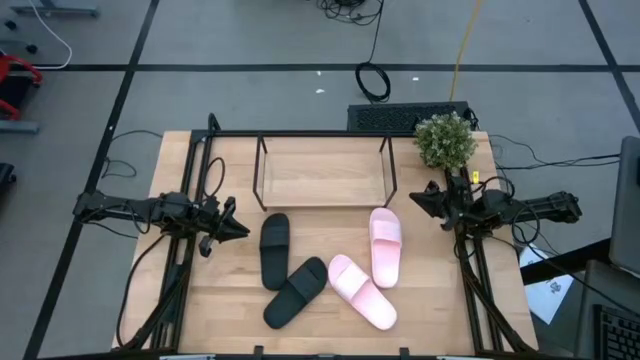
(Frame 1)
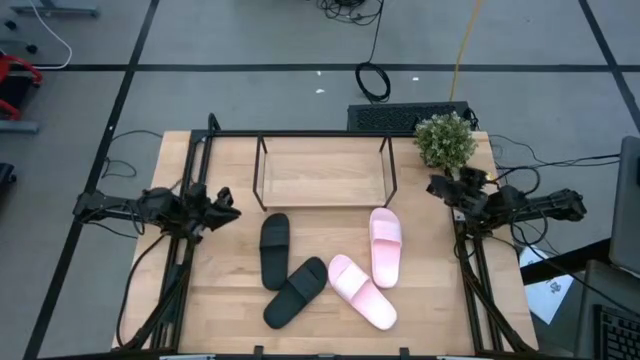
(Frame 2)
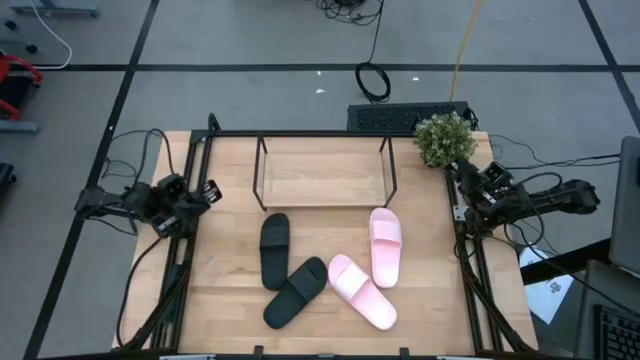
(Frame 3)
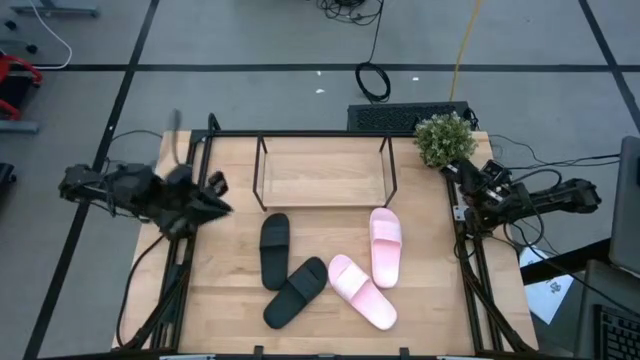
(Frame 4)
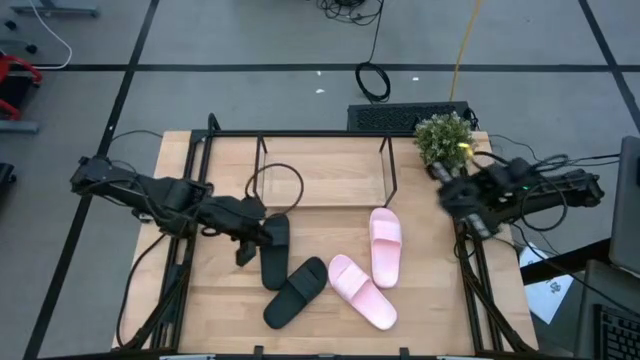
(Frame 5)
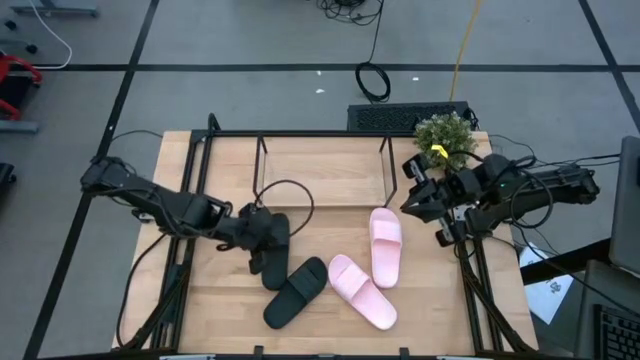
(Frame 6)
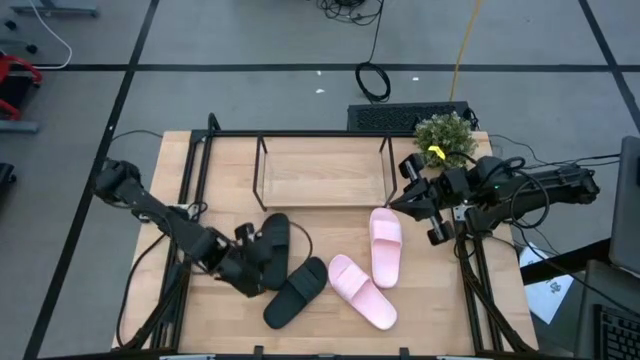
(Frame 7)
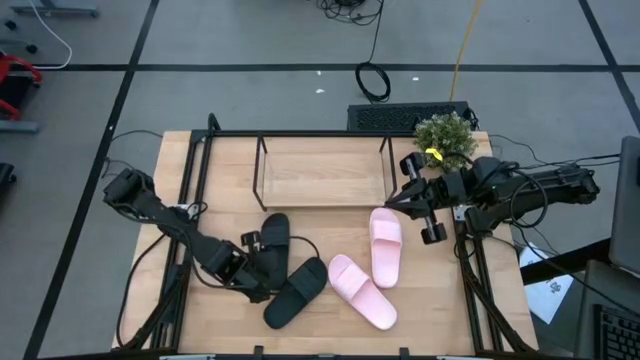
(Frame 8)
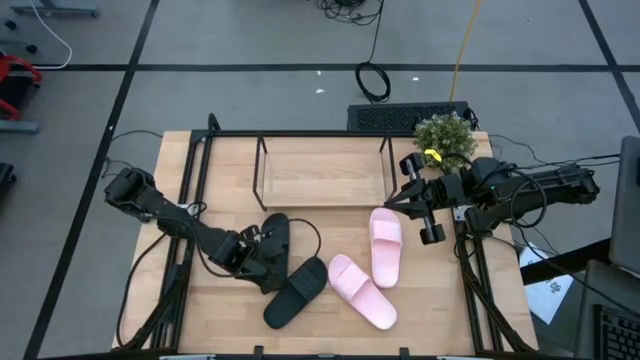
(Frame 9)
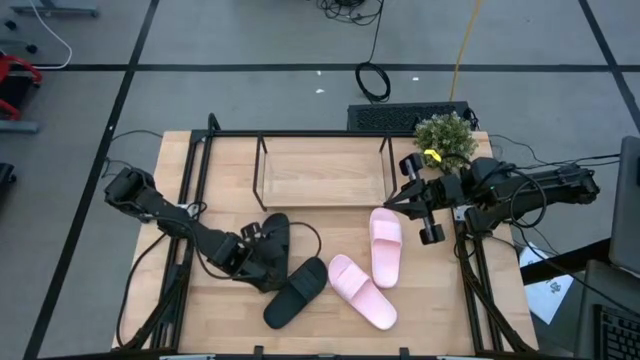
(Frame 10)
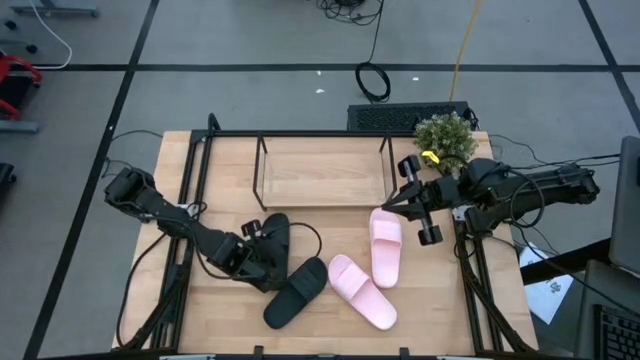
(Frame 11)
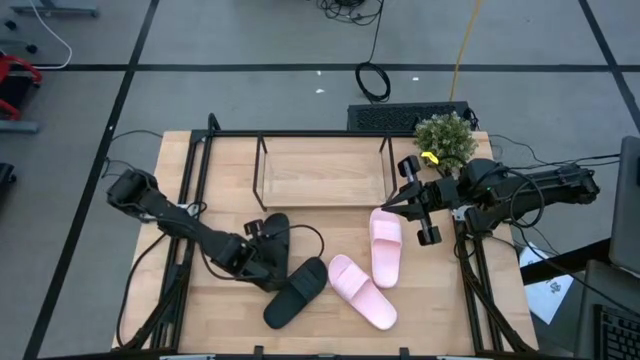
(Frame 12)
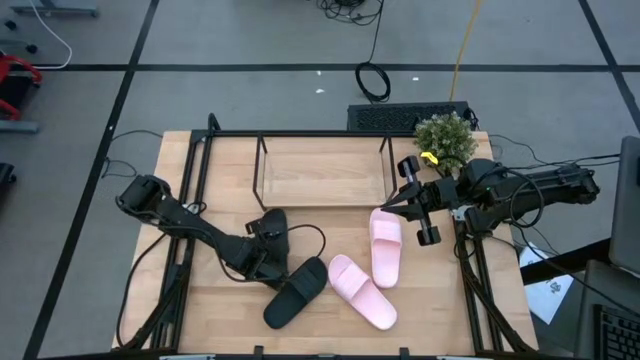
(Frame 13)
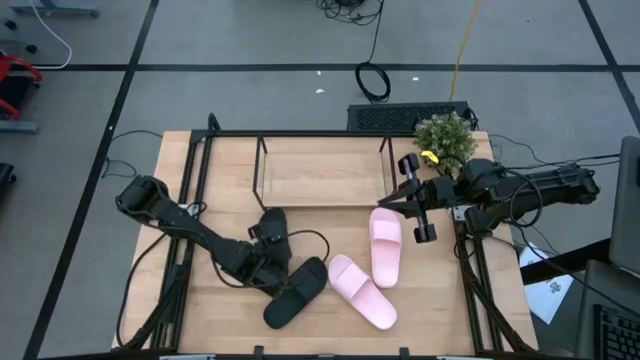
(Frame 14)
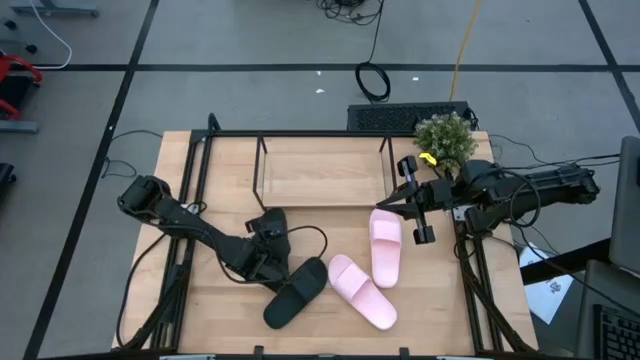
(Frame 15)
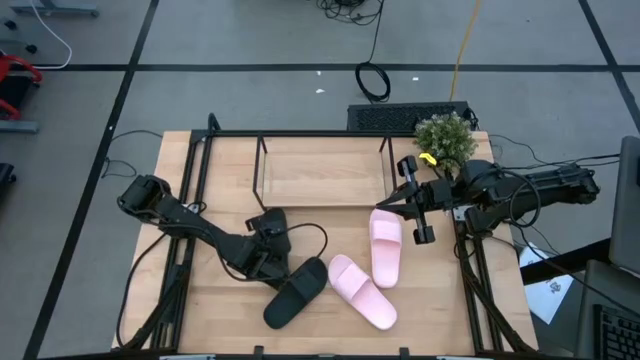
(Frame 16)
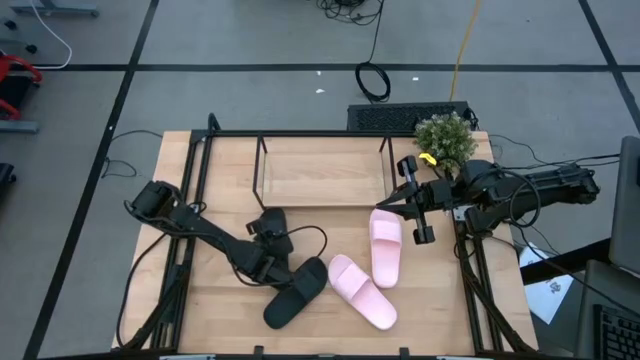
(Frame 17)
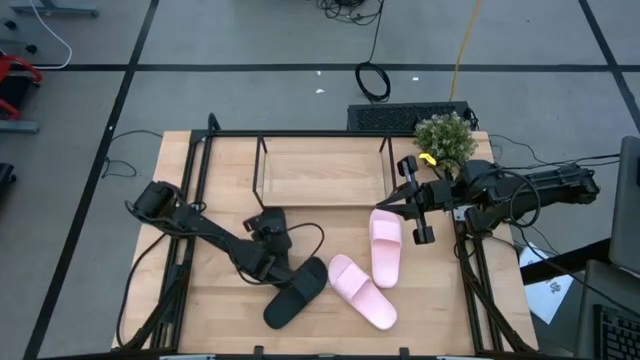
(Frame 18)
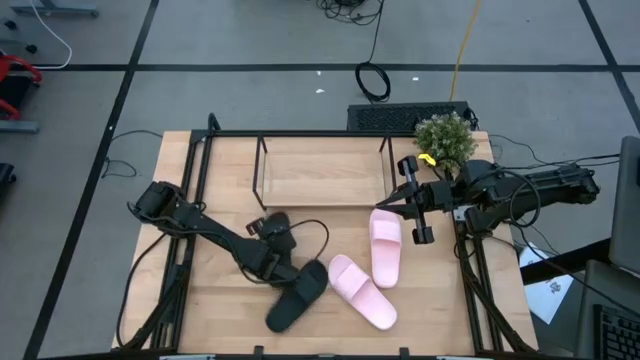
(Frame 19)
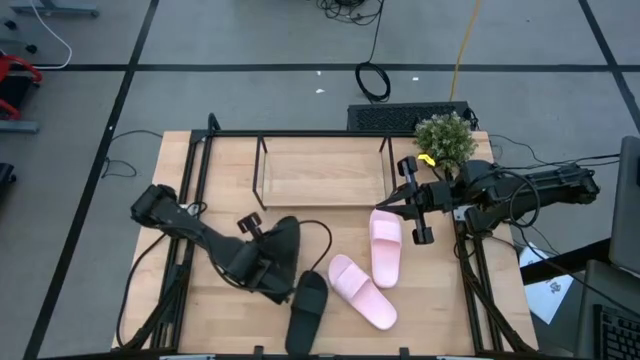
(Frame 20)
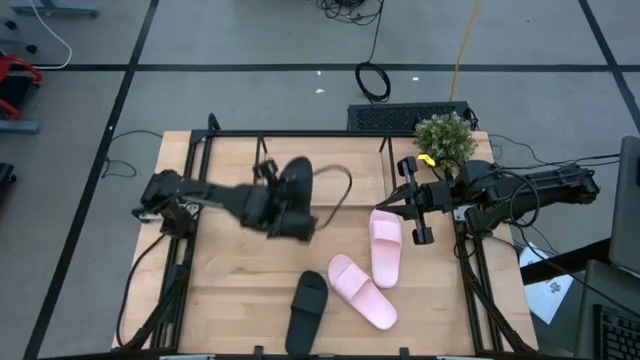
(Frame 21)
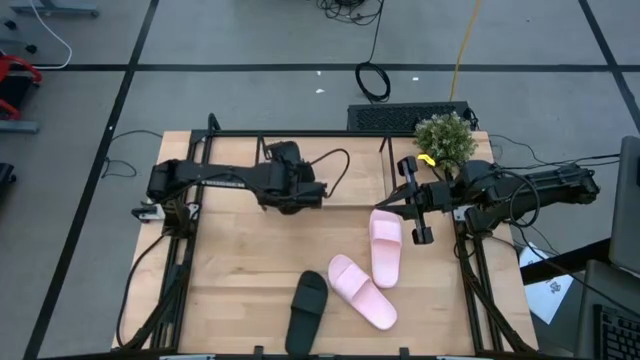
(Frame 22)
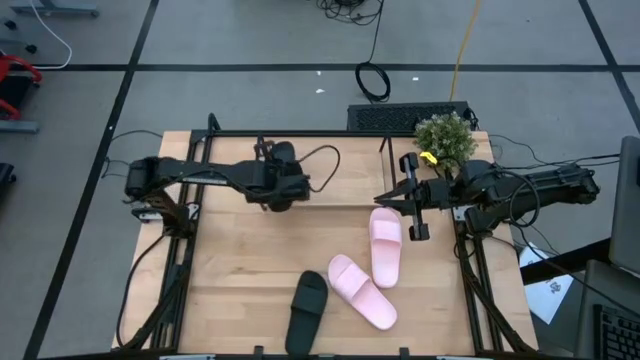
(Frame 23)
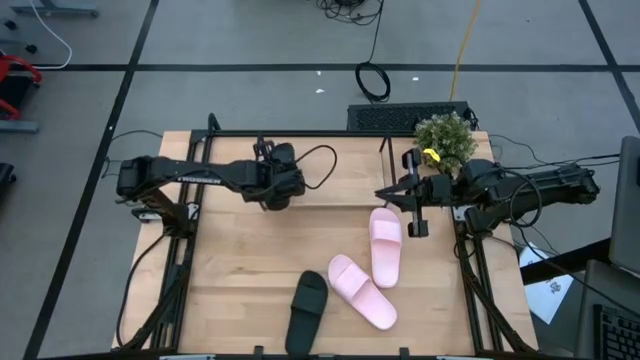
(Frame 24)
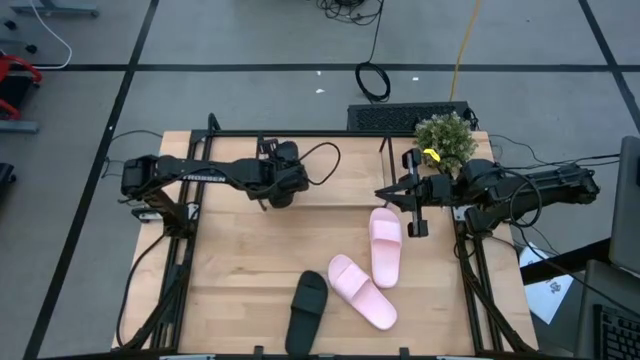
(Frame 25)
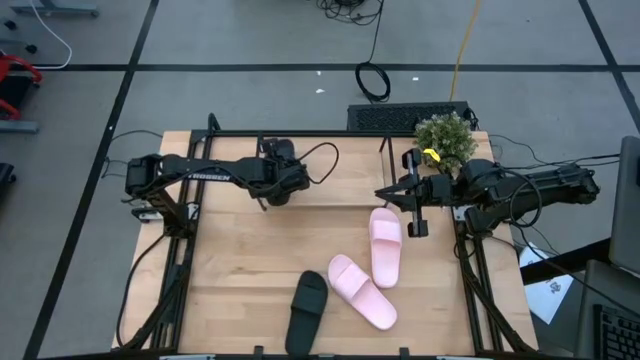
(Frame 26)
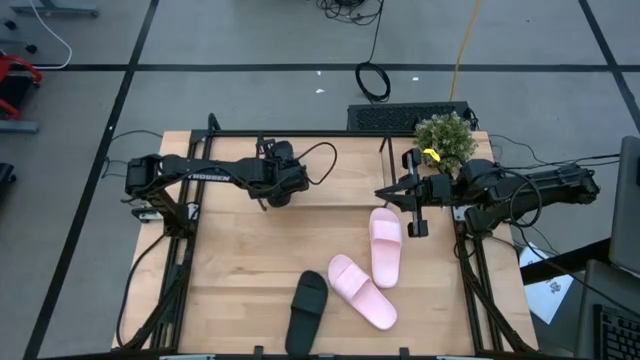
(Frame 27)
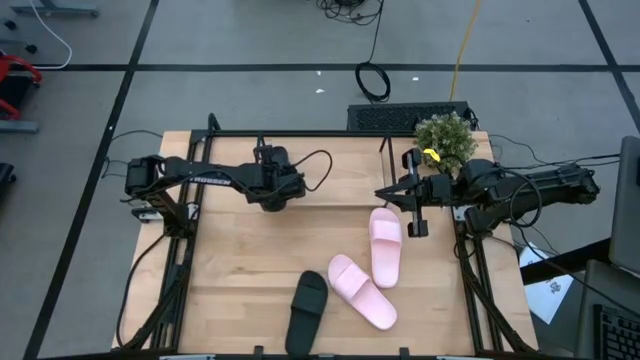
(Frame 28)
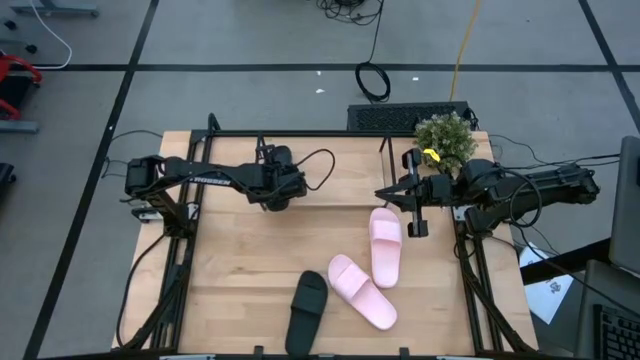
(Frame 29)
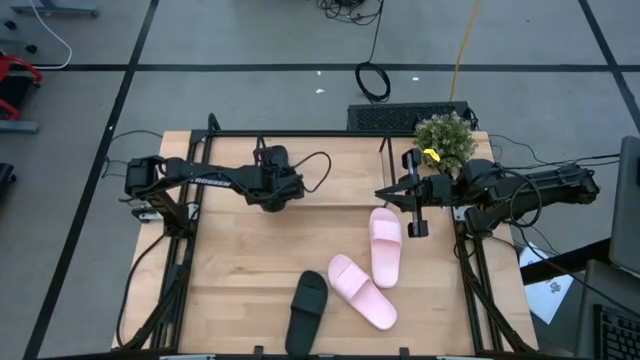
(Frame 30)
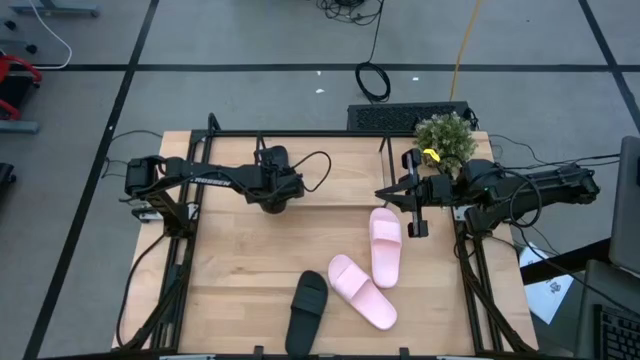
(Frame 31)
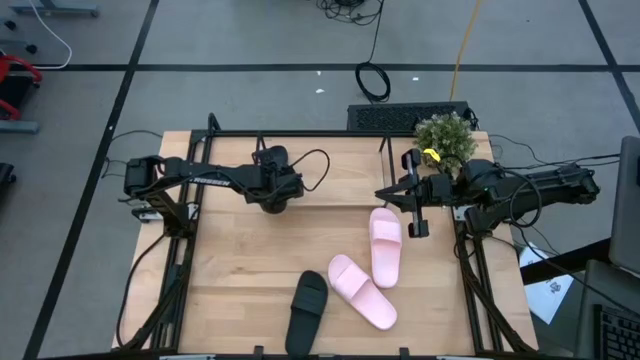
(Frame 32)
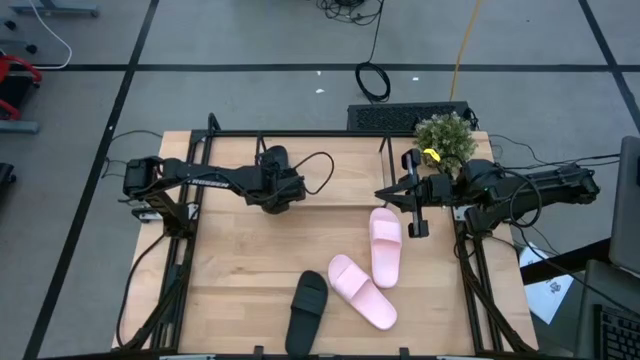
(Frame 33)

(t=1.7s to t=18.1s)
Task: Pick and place slides into the shelf
Put the left black slipper on the shelf
